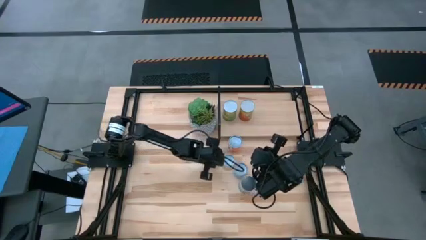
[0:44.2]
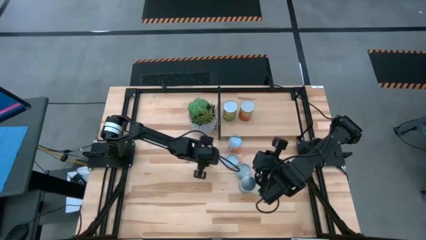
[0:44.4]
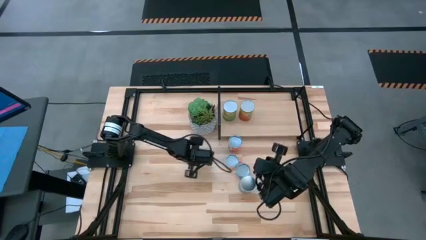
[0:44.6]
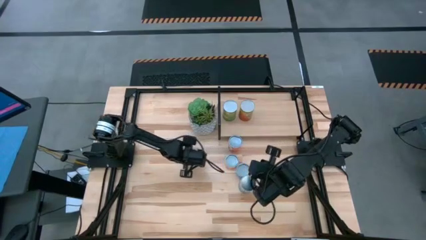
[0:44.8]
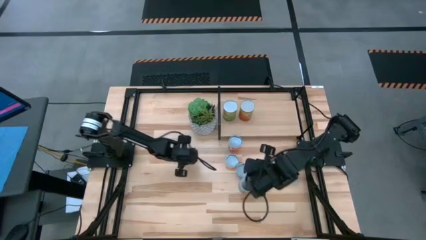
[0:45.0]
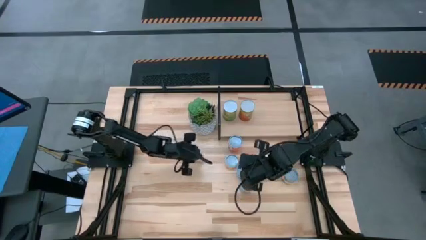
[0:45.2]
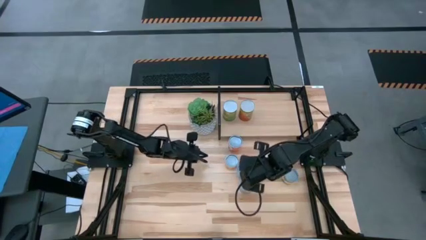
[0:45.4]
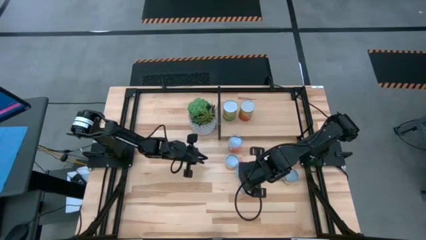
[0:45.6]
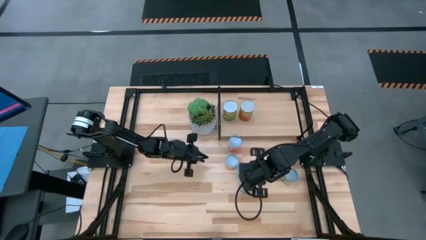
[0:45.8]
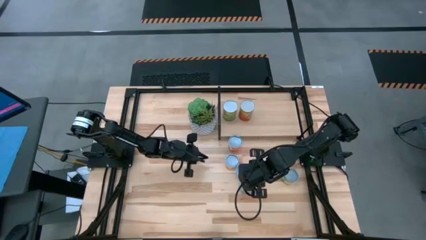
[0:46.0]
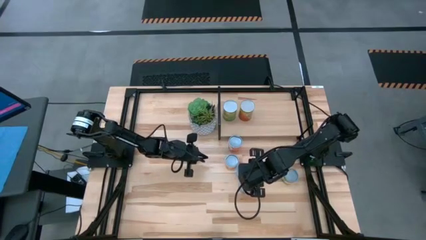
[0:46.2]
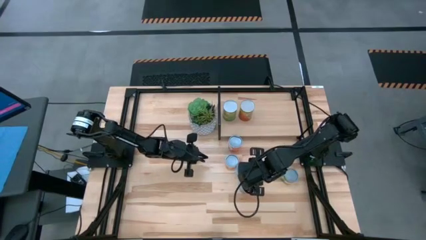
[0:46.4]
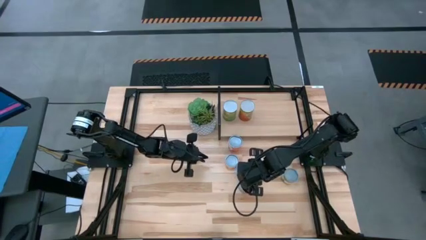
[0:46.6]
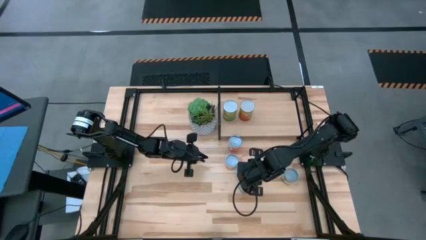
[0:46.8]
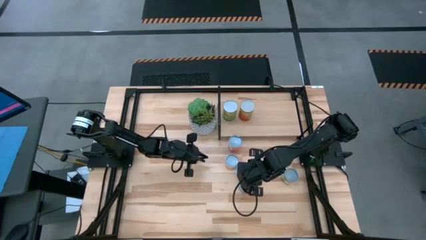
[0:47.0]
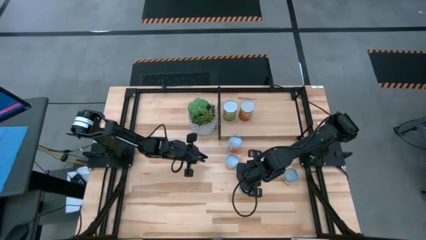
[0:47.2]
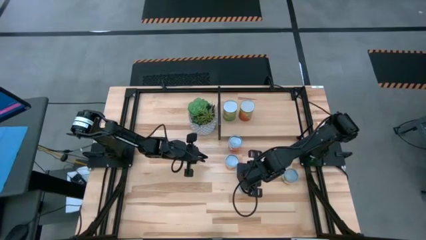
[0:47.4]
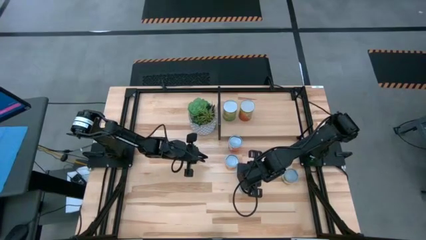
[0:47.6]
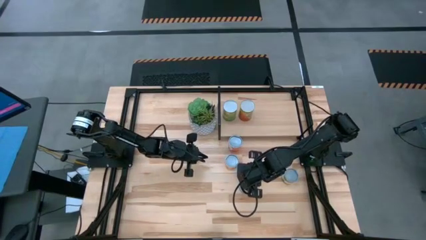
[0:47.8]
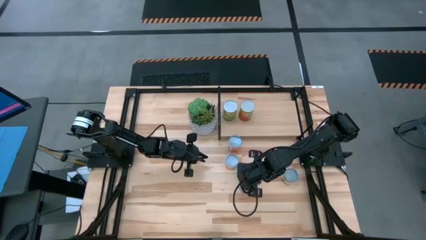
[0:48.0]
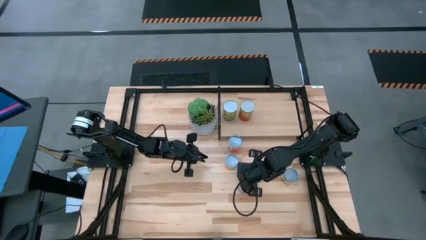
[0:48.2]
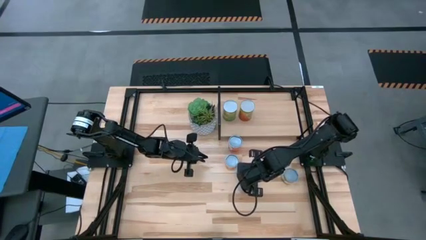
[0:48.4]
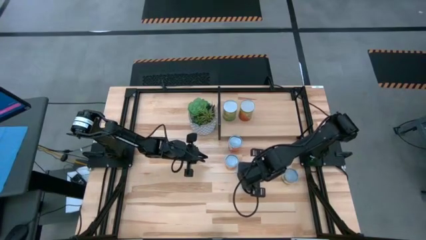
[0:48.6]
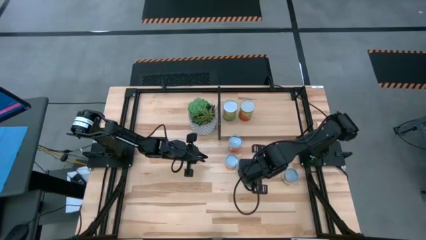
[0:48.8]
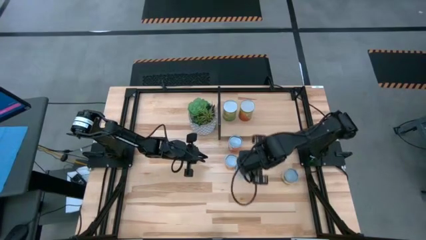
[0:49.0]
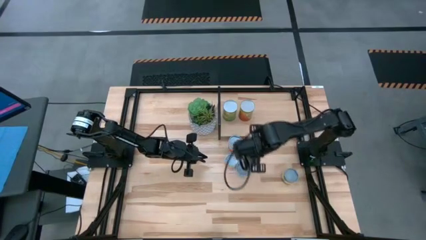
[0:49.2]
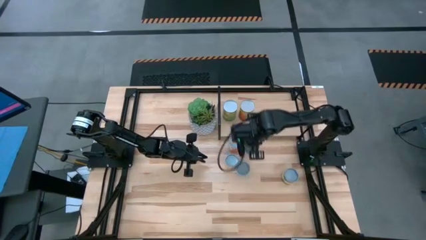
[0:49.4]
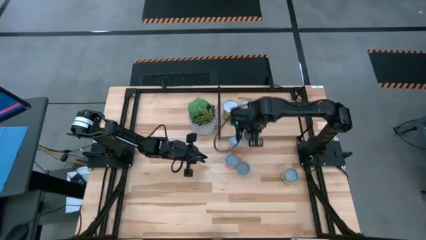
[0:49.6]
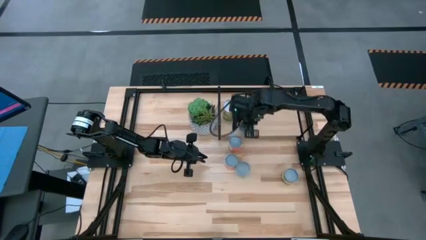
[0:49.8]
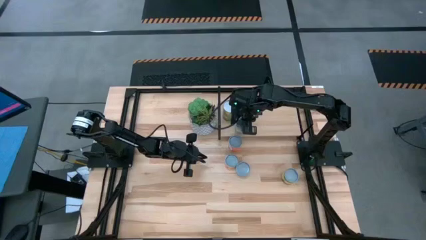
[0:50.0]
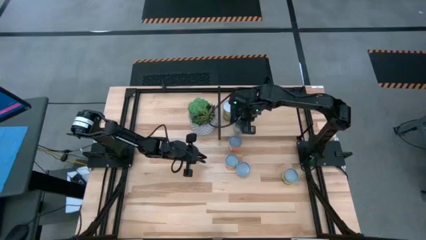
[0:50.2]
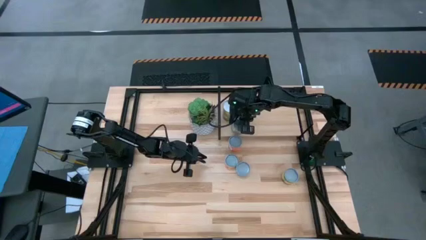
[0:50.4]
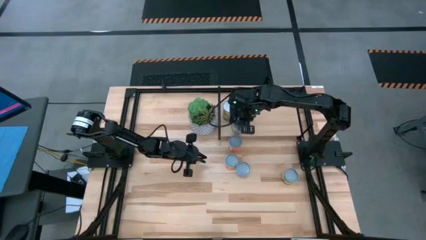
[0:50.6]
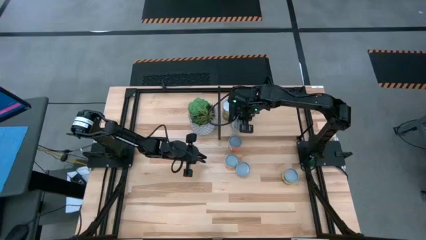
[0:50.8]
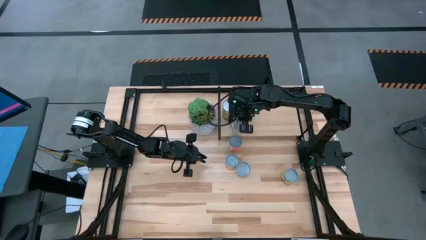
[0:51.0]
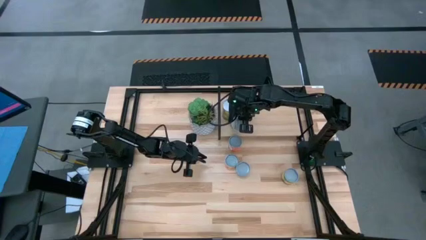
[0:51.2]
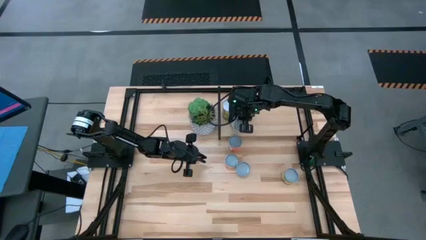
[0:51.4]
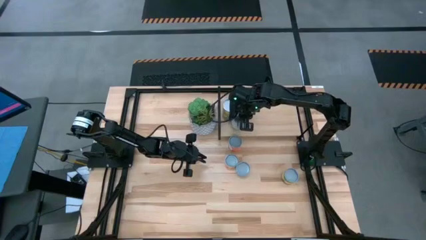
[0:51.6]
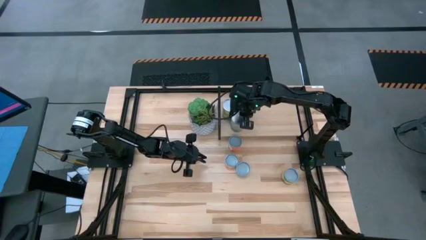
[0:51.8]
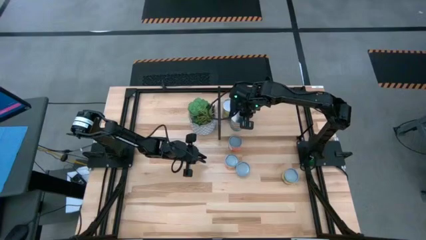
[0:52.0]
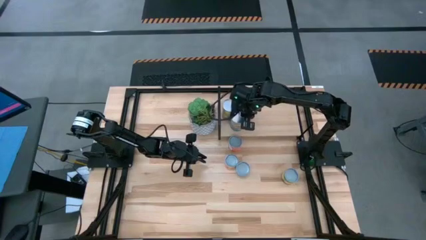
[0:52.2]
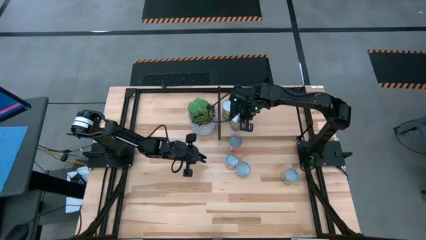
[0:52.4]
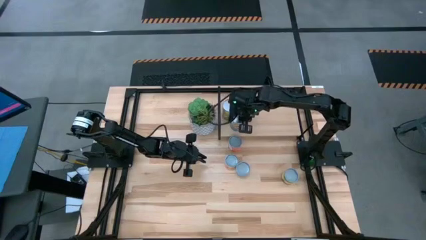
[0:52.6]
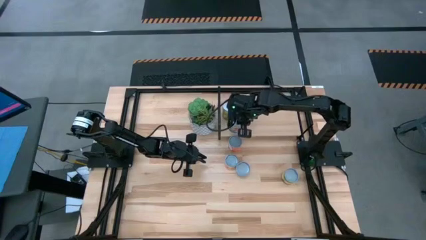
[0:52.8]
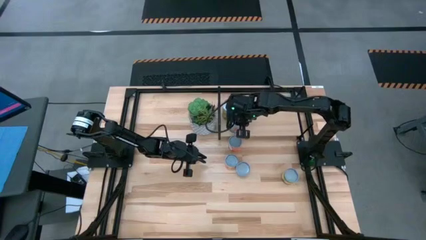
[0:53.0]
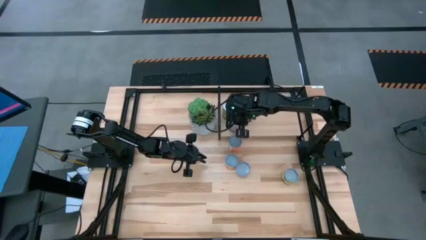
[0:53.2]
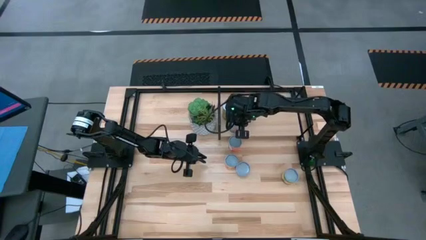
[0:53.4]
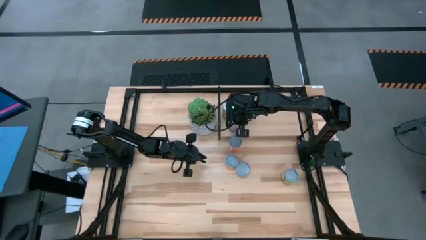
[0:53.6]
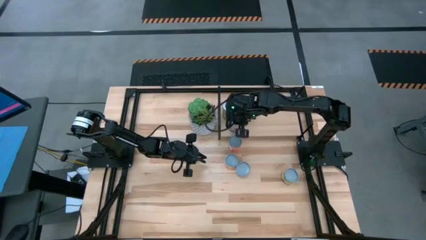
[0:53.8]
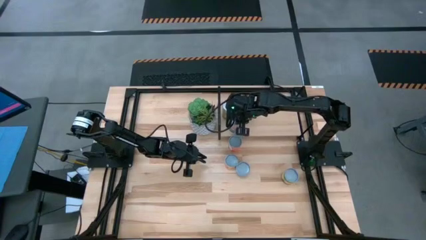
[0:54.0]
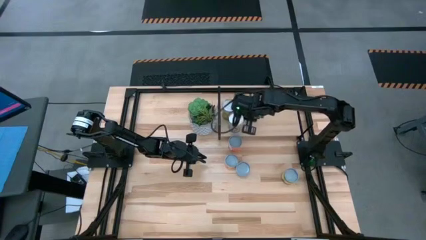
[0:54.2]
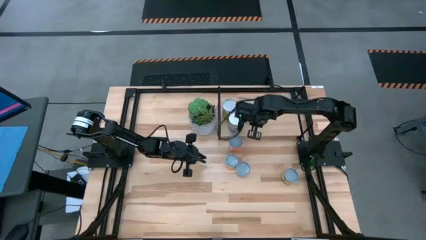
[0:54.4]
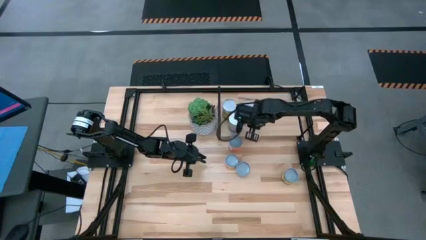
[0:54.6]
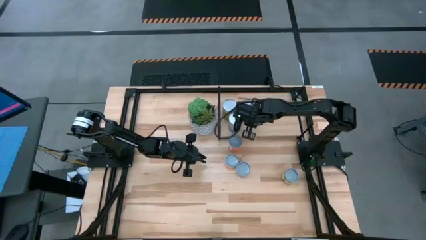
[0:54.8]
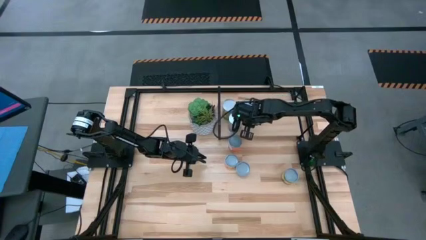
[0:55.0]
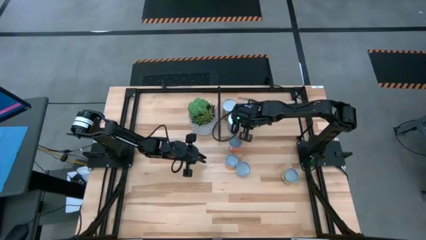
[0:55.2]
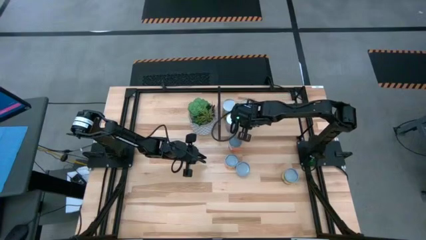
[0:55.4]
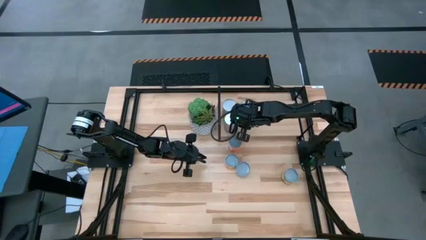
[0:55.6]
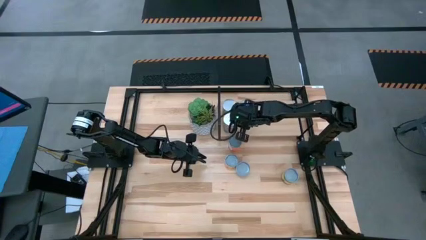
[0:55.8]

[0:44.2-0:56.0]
Task: Pick and place cans onto a shelf
Put the canned tomatoes on the shelf

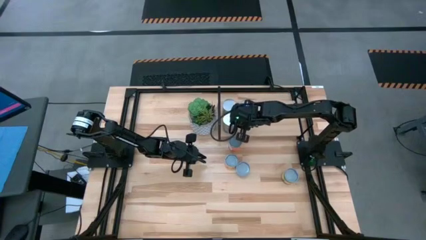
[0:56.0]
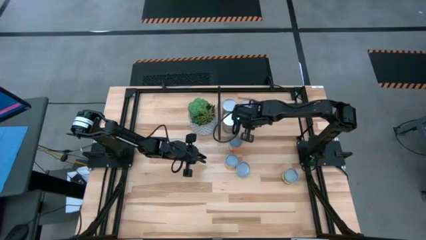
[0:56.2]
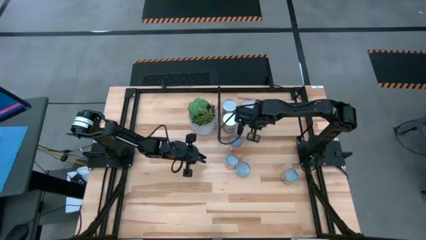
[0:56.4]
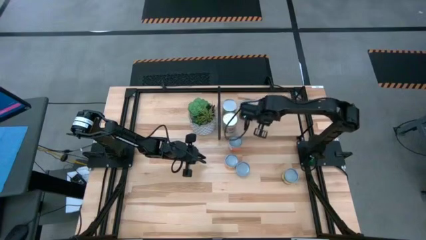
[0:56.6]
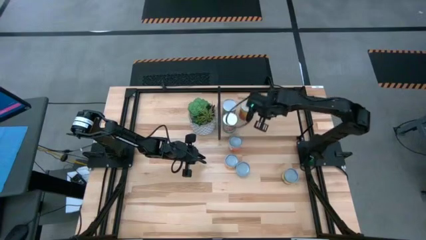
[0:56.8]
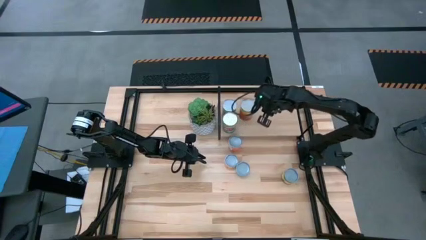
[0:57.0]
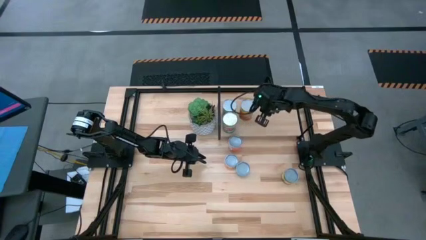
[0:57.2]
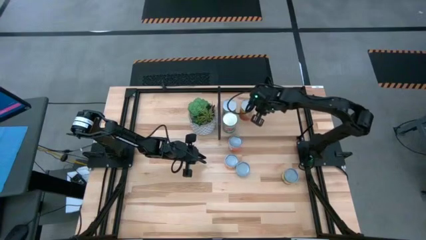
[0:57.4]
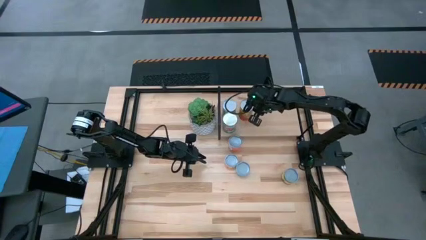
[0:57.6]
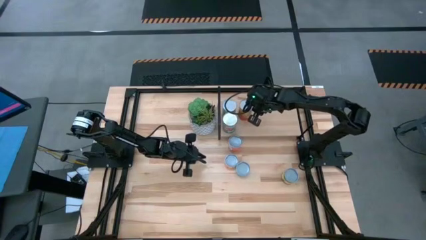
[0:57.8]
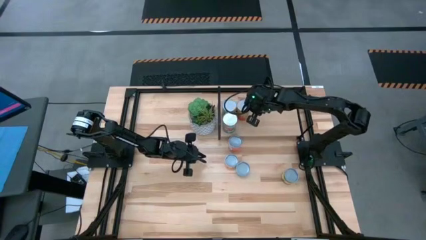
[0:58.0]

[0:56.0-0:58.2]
Adjust the canned green peas on the shelf
